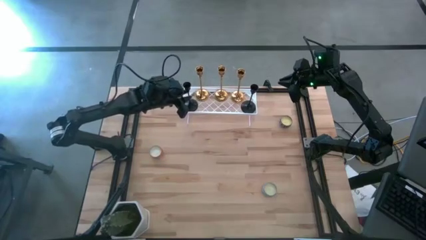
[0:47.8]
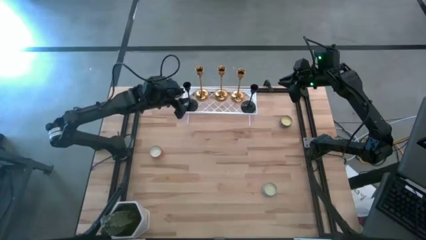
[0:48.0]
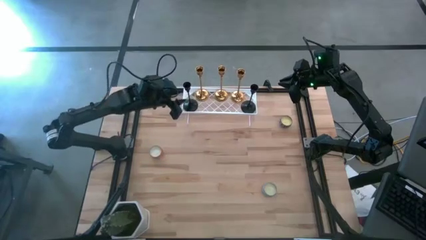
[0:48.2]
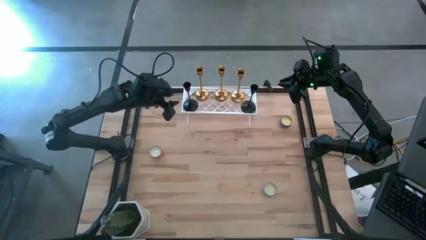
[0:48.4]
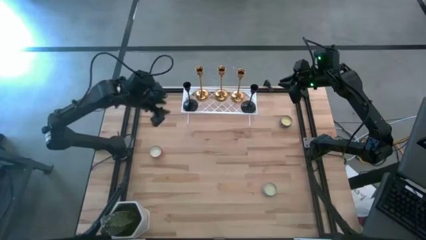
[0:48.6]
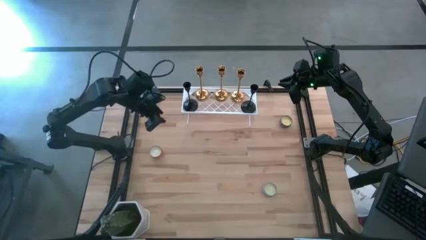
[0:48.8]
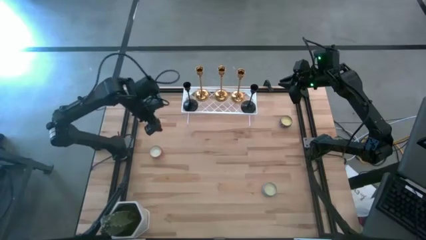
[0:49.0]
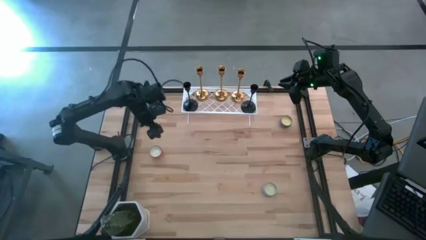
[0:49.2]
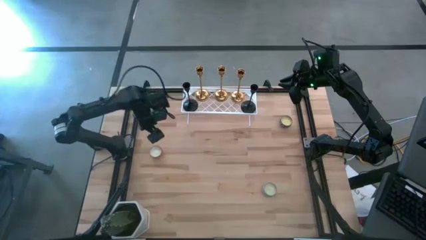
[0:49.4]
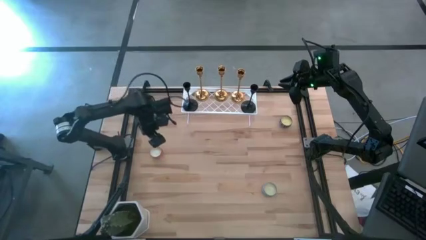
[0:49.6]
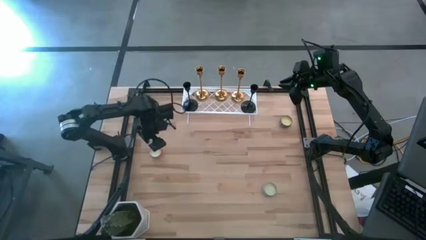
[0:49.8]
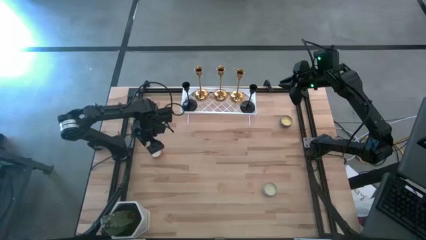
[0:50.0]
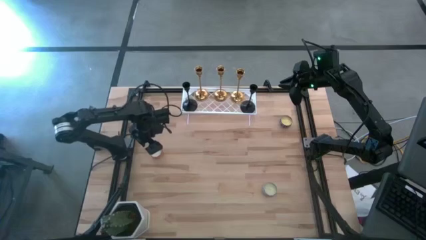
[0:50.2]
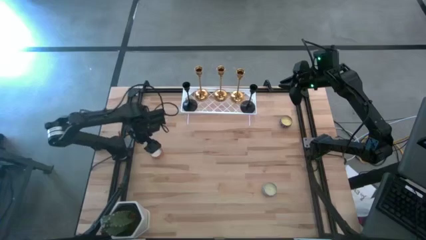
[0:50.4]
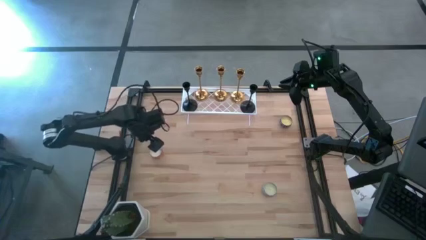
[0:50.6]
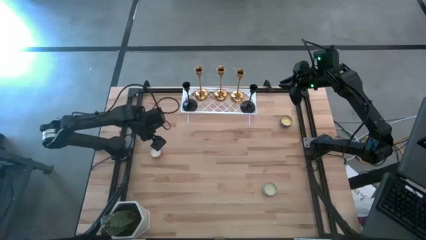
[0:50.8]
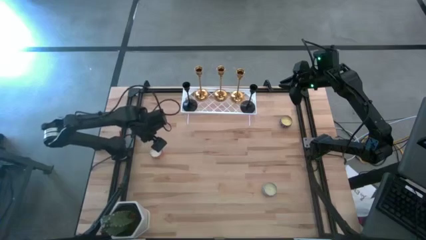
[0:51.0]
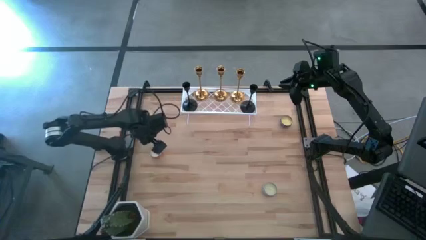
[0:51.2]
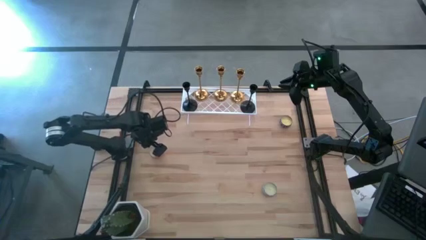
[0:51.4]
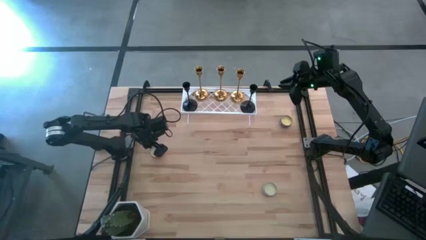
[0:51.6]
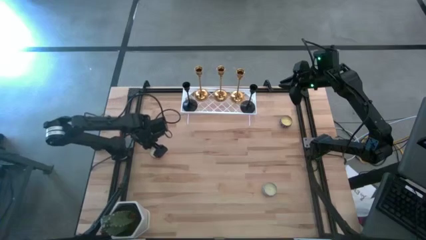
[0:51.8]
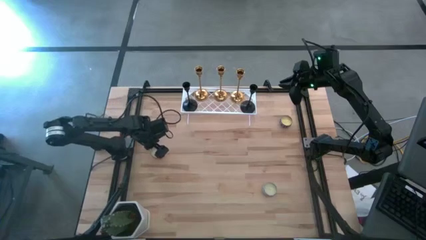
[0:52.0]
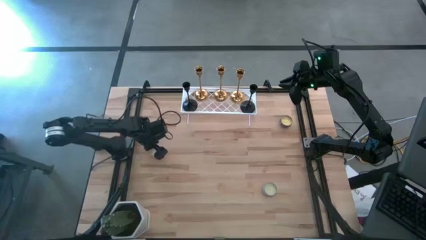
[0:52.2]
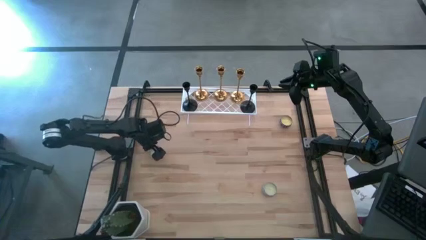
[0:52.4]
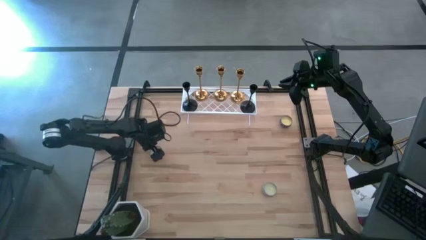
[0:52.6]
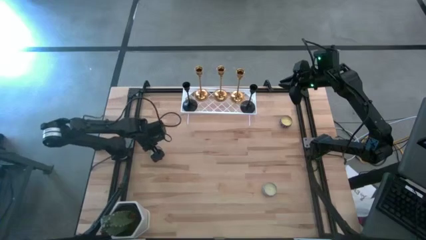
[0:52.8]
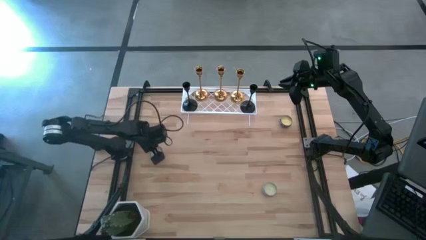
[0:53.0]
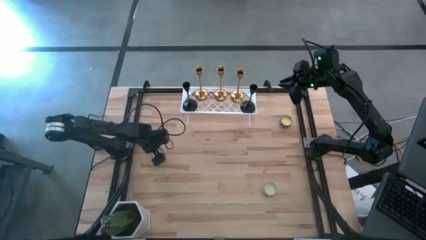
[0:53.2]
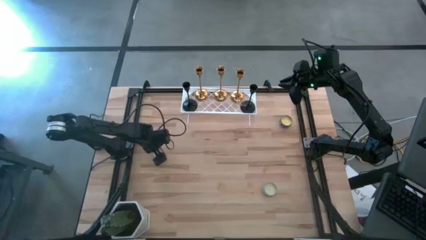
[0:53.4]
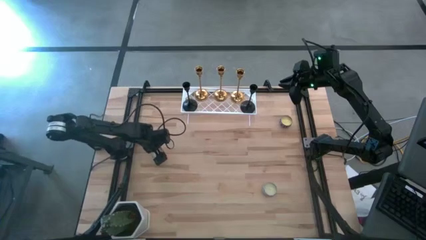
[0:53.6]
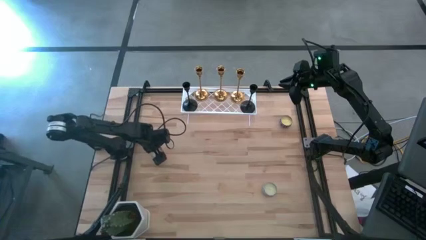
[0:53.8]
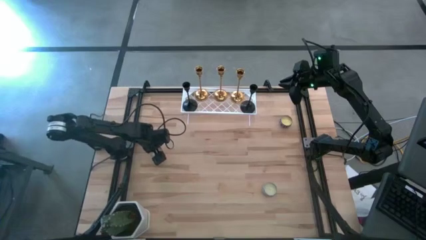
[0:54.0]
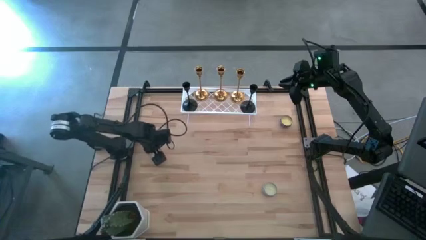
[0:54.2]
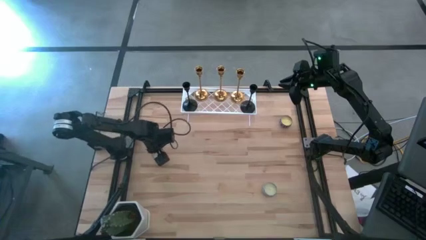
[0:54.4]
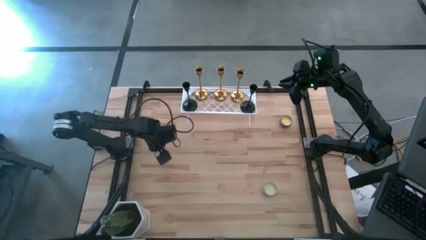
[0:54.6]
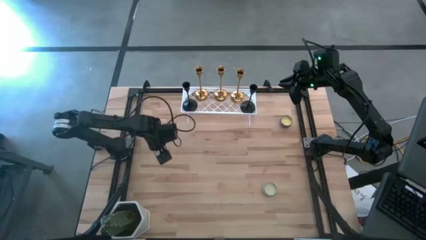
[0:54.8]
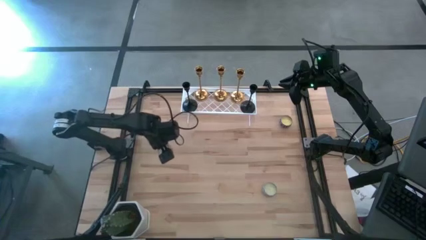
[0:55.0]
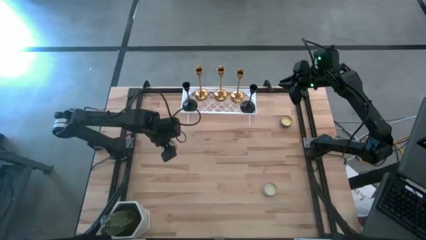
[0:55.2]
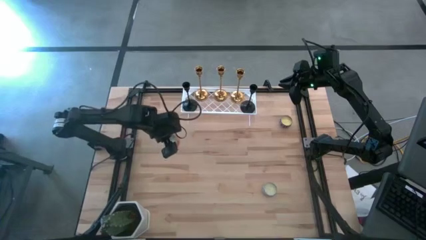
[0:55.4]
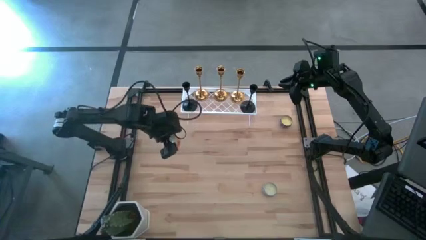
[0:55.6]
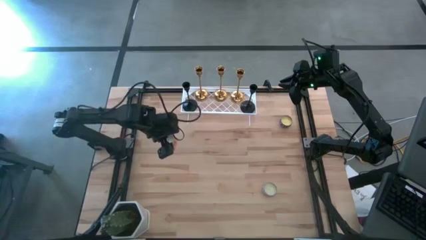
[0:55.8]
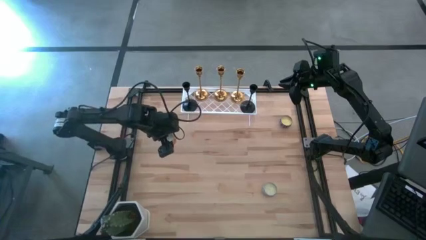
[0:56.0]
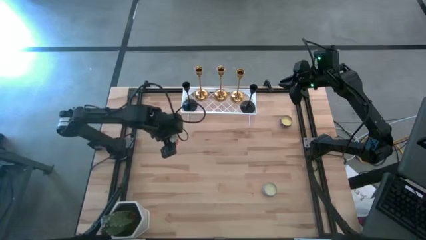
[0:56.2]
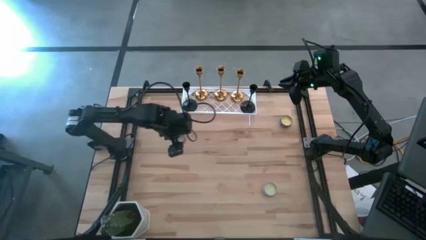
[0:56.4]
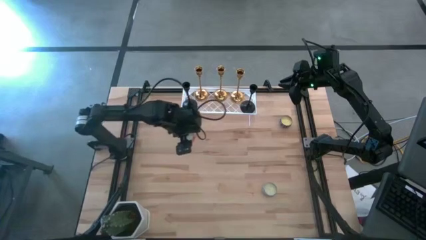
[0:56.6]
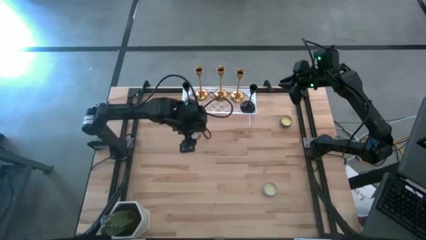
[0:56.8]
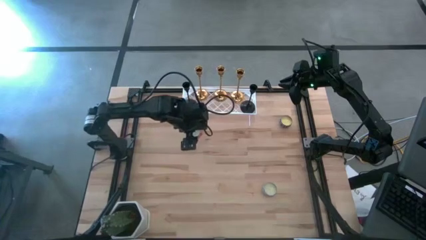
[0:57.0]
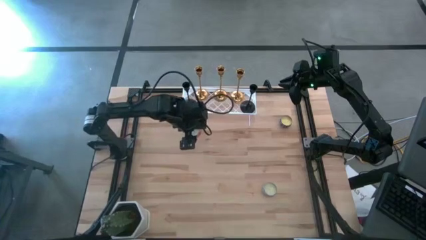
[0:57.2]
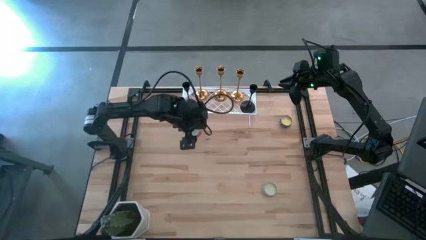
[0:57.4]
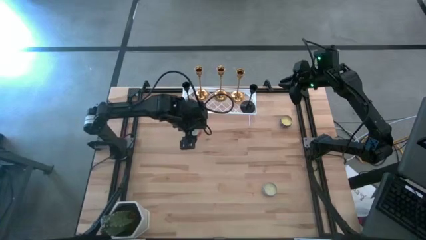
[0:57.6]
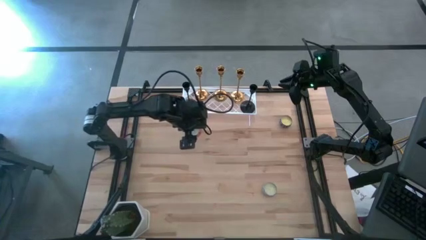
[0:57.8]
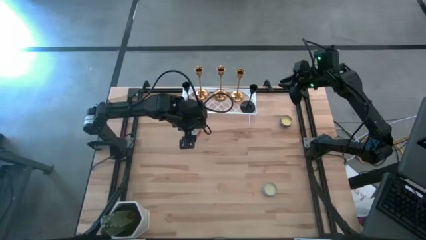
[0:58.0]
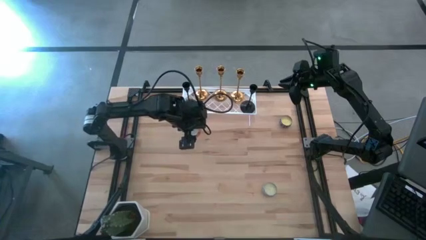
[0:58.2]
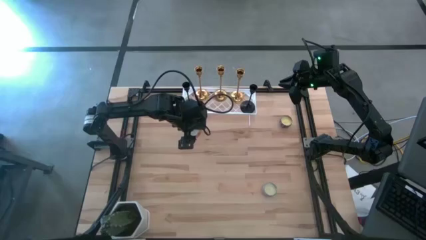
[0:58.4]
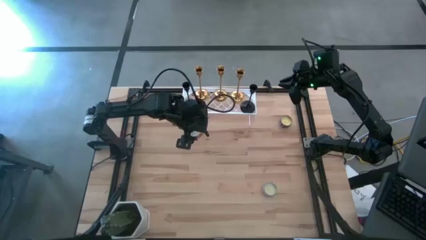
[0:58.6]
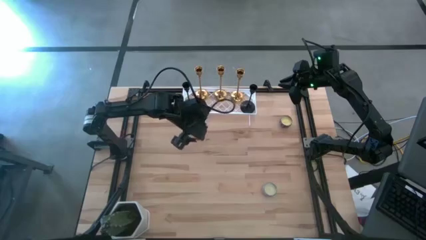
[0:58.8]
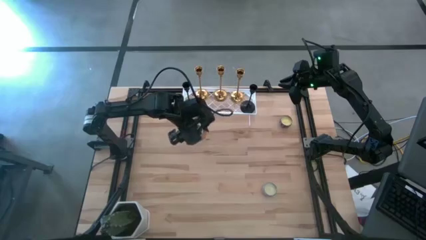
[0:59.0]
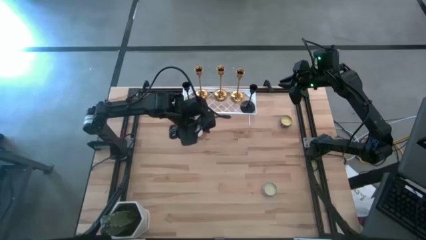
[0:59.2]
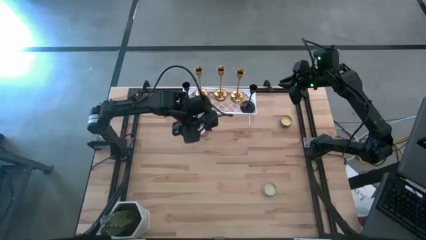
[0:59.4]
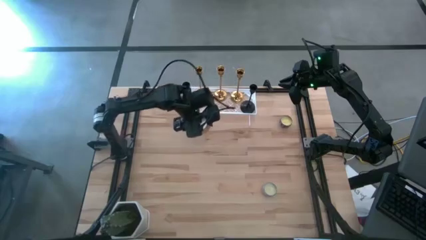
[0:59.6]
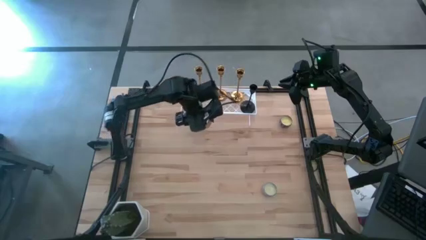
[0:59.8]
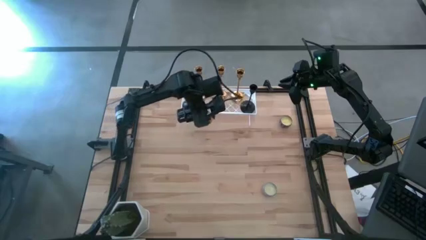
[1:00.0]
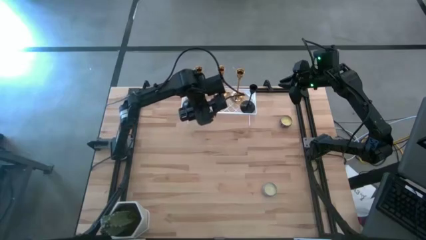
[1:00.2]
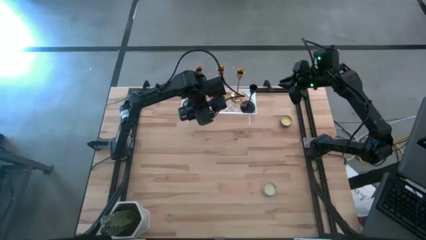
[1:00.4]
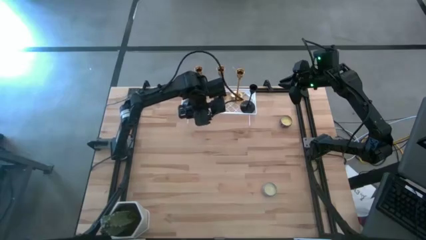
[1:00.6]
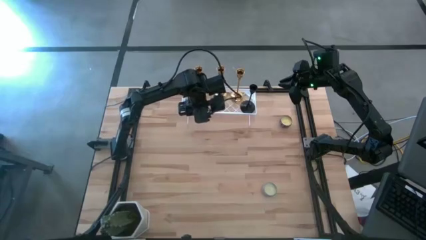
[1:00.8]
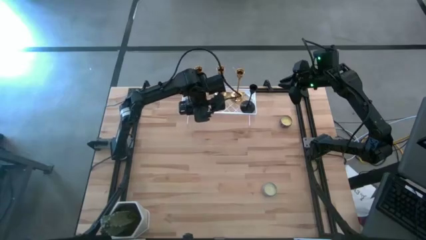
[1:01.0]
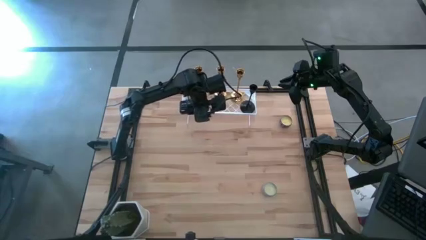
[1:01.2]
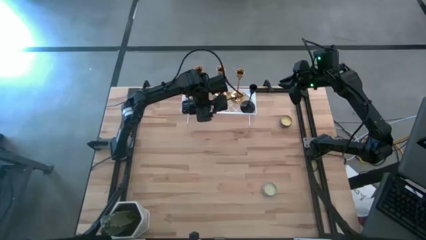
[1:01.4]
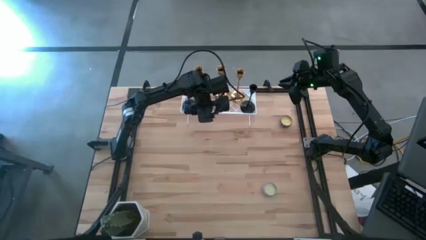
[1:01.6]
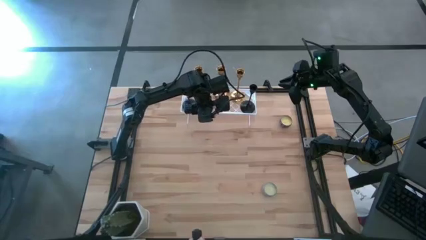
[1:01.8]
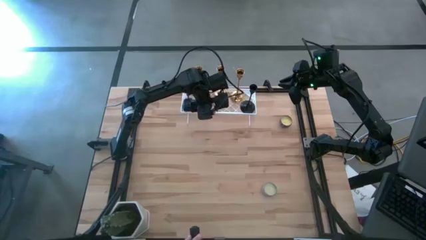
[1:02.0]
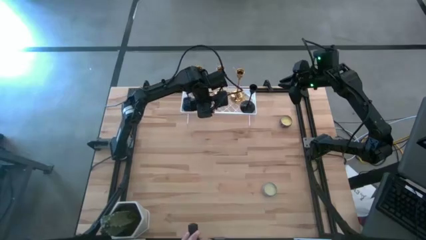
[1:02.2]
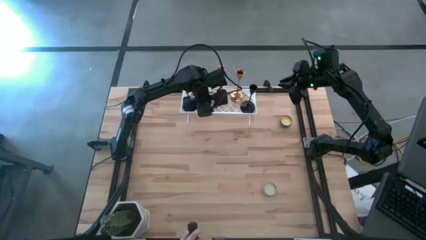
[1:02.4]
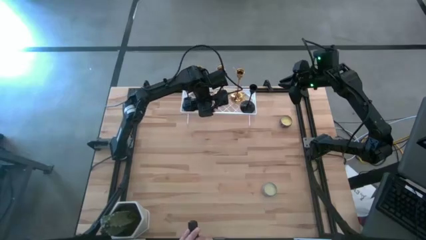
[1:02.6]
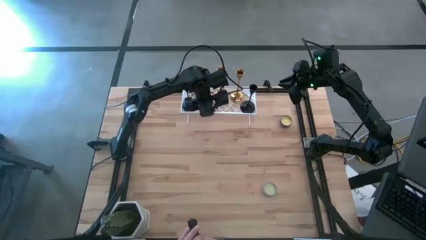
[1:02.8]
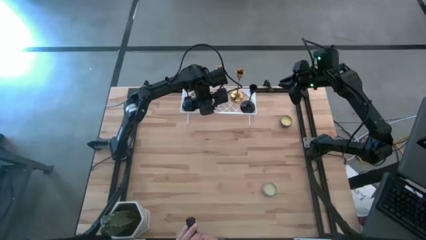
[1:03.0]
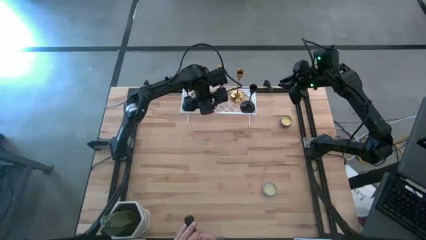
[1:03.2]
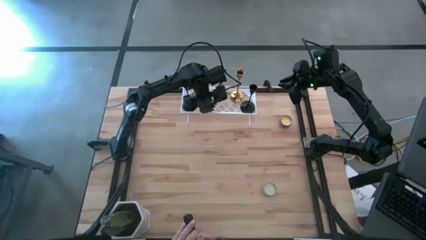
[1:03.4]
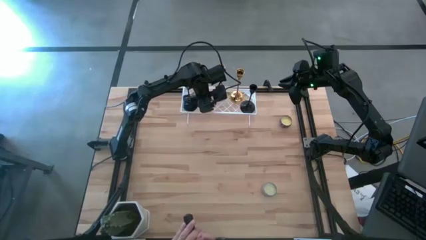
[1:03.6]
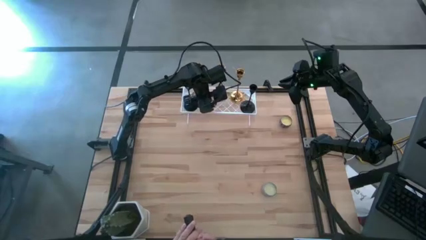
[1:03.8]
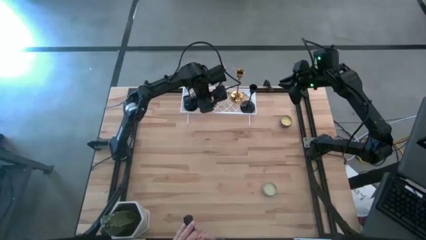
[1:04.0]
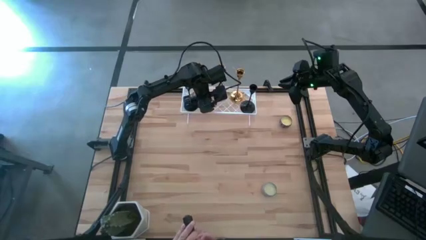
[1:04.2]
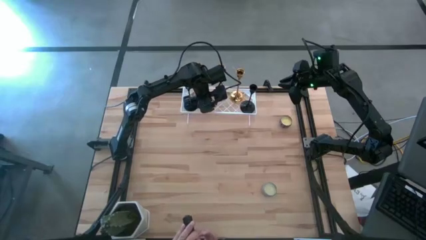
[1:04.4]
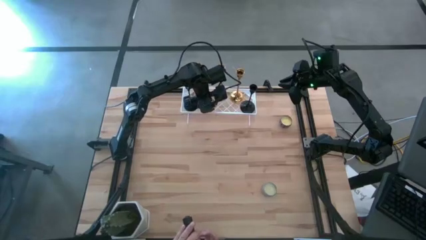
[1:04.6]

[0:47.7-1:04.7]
Task: Pick & Place candle stick holders
Put the white scented candle on the shelf
